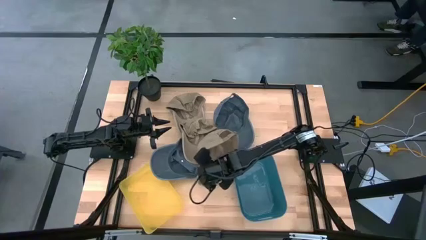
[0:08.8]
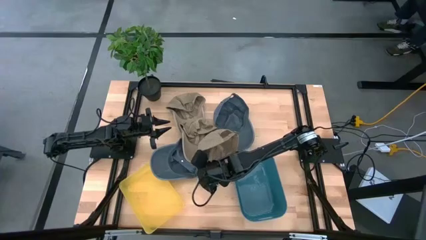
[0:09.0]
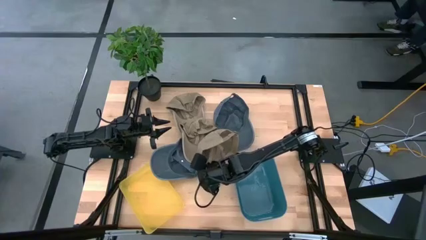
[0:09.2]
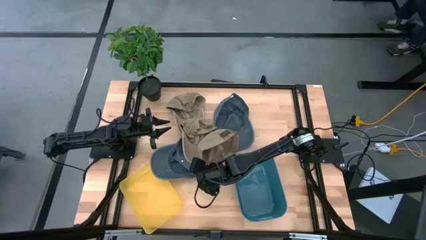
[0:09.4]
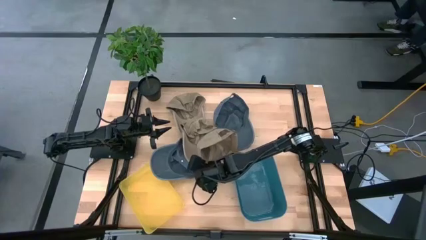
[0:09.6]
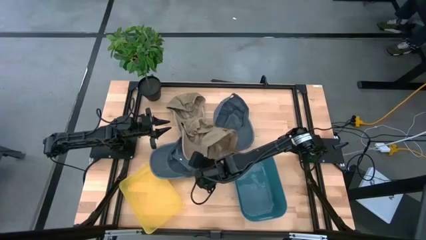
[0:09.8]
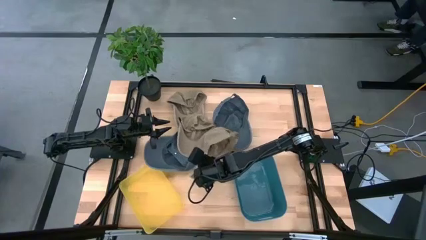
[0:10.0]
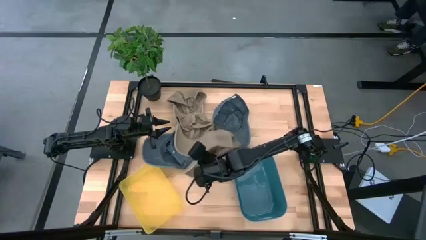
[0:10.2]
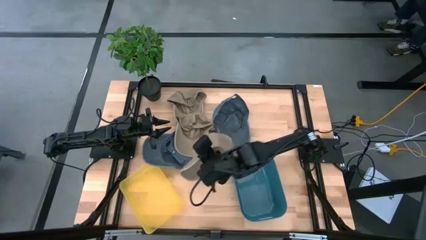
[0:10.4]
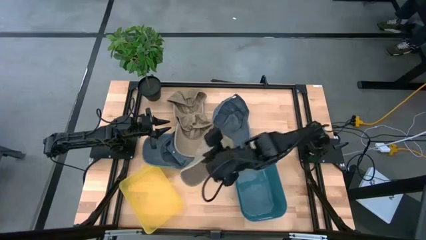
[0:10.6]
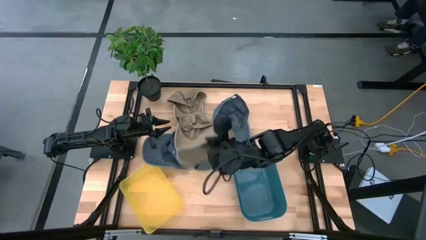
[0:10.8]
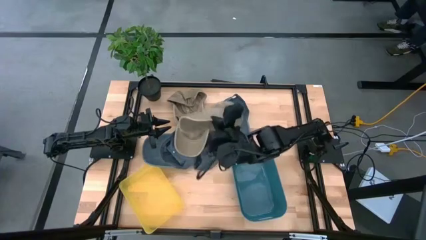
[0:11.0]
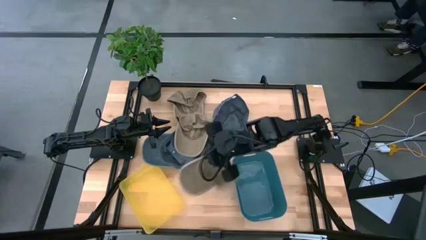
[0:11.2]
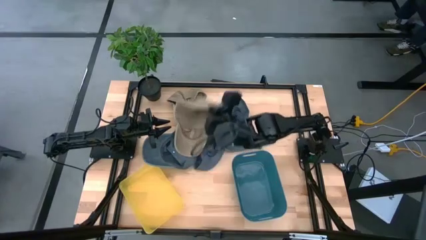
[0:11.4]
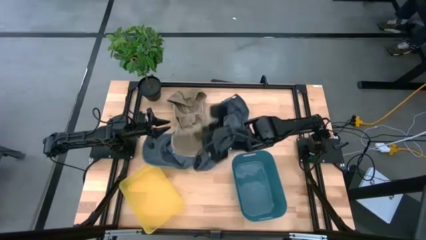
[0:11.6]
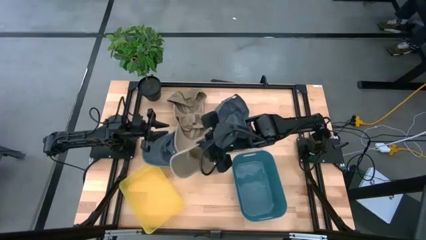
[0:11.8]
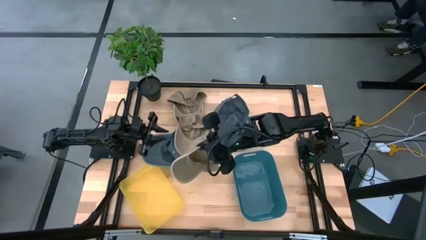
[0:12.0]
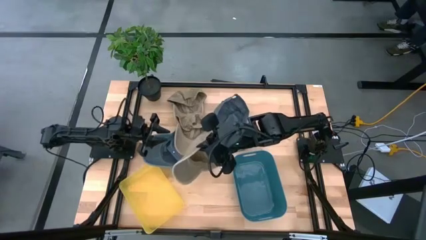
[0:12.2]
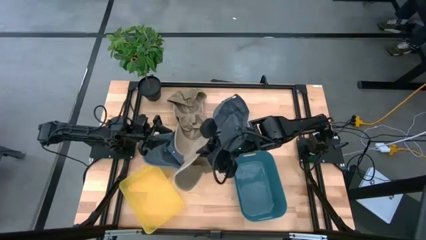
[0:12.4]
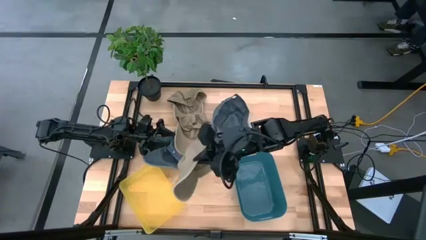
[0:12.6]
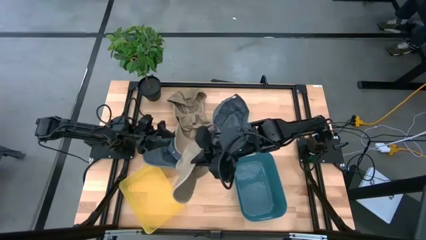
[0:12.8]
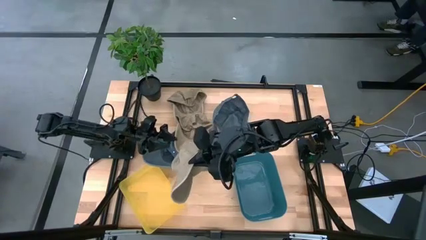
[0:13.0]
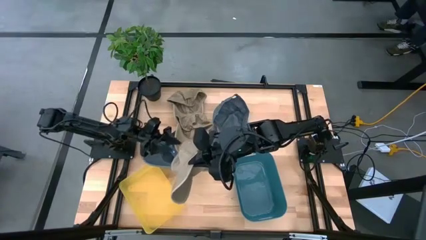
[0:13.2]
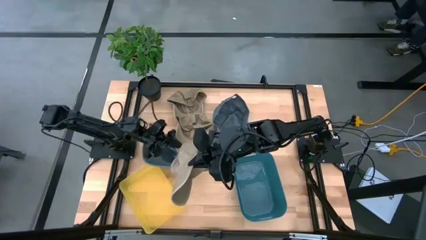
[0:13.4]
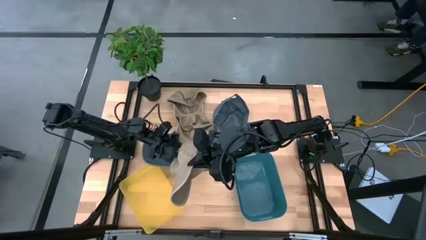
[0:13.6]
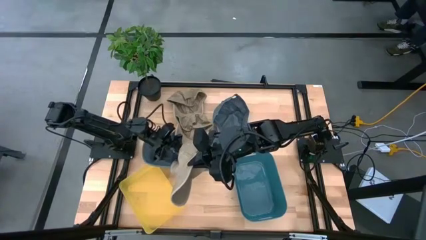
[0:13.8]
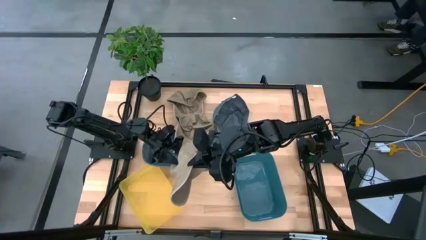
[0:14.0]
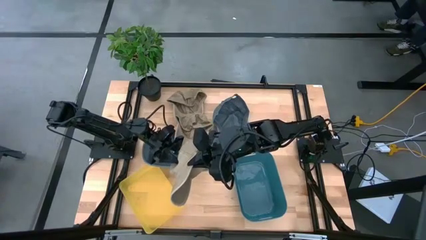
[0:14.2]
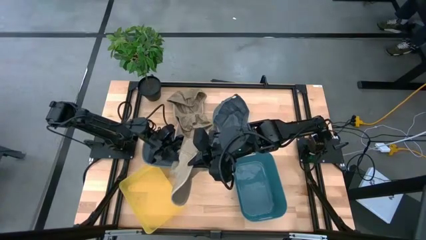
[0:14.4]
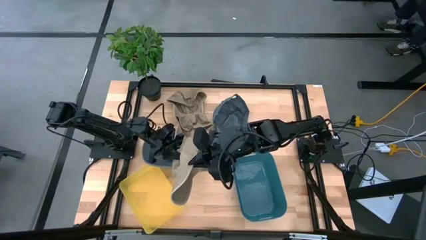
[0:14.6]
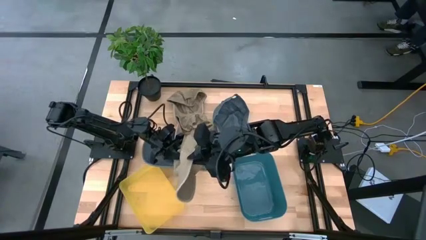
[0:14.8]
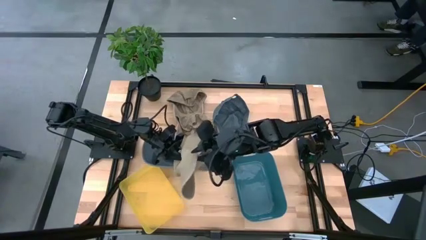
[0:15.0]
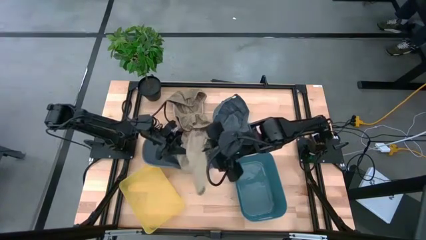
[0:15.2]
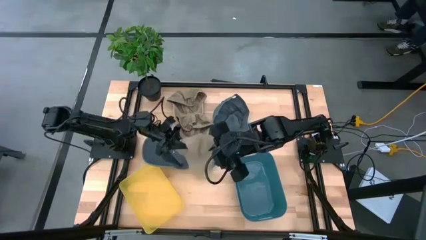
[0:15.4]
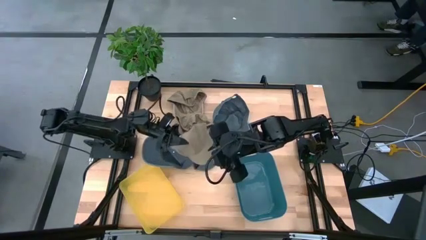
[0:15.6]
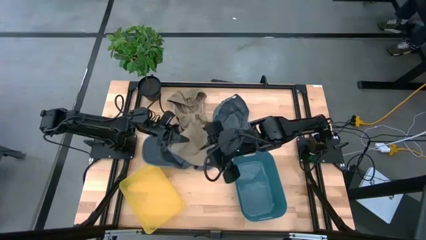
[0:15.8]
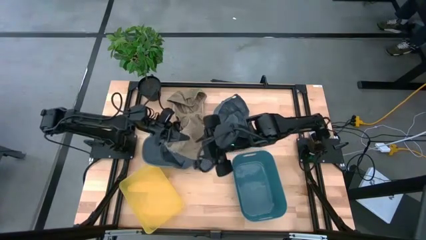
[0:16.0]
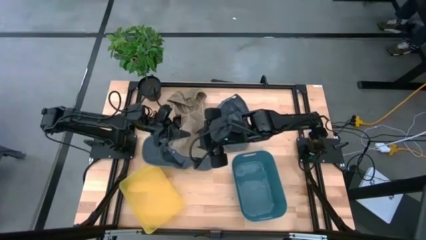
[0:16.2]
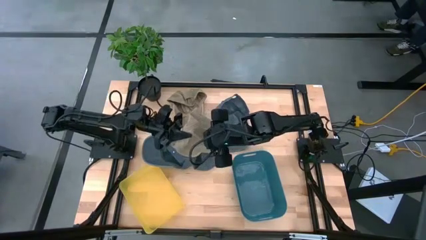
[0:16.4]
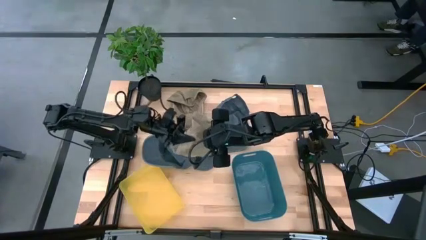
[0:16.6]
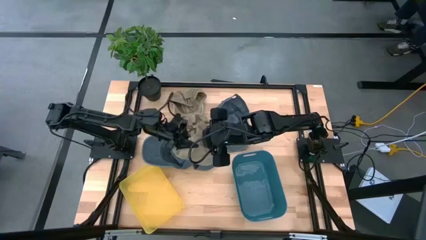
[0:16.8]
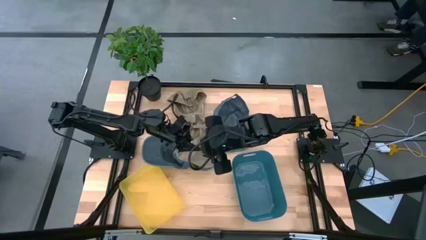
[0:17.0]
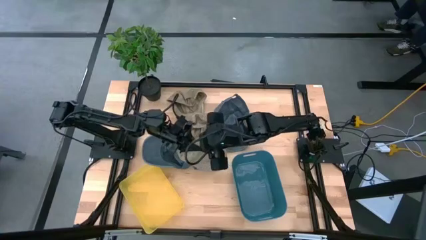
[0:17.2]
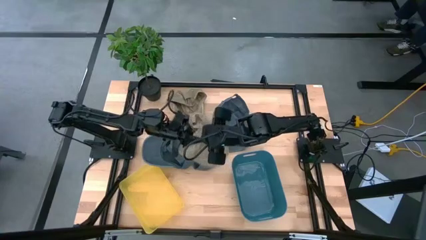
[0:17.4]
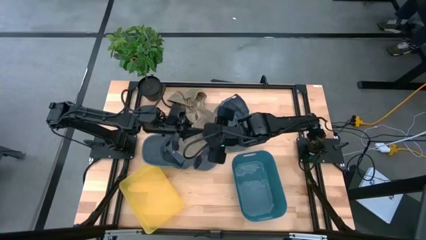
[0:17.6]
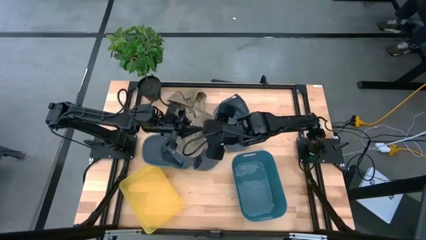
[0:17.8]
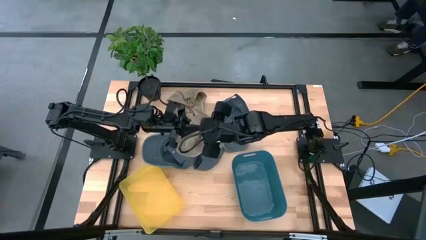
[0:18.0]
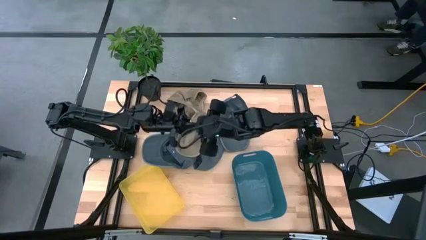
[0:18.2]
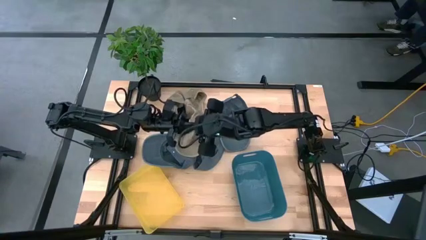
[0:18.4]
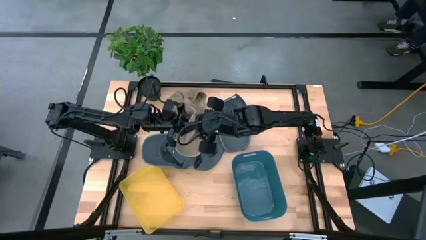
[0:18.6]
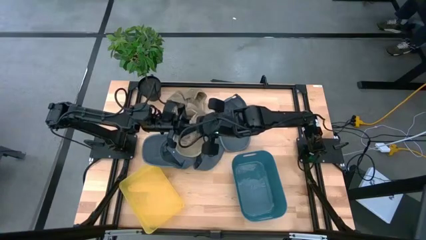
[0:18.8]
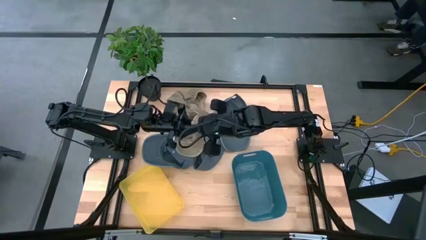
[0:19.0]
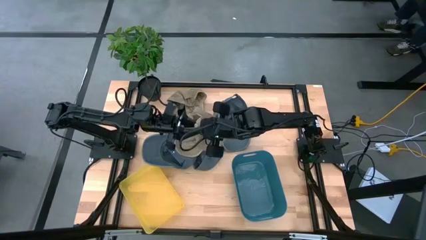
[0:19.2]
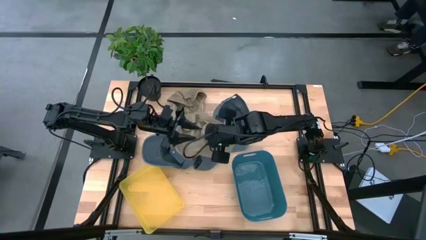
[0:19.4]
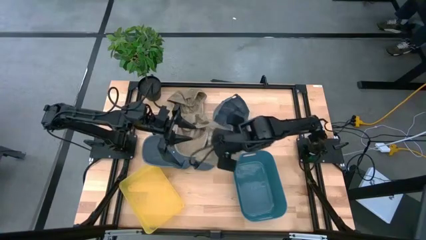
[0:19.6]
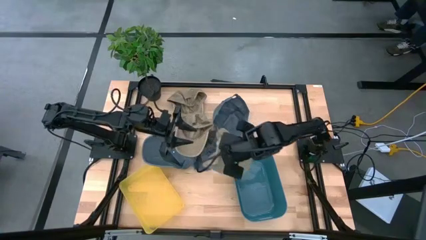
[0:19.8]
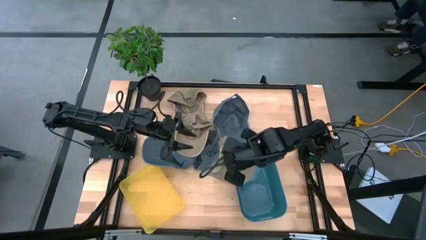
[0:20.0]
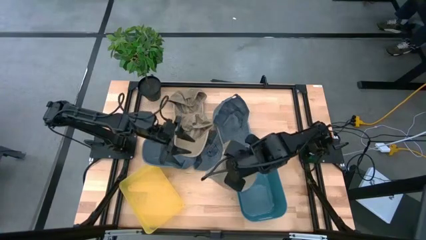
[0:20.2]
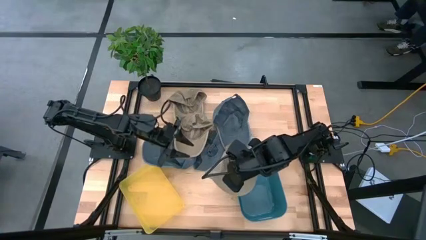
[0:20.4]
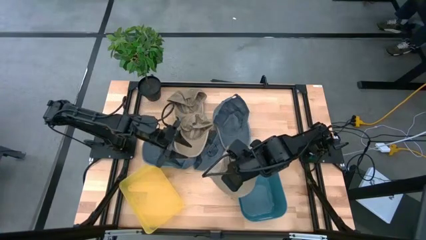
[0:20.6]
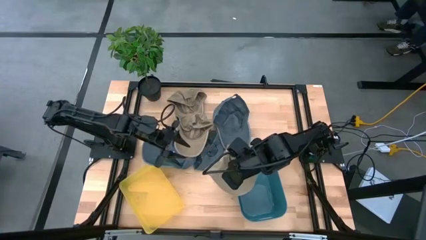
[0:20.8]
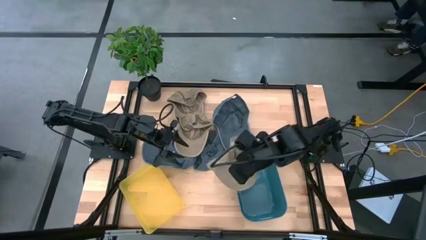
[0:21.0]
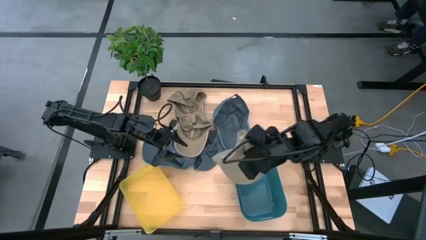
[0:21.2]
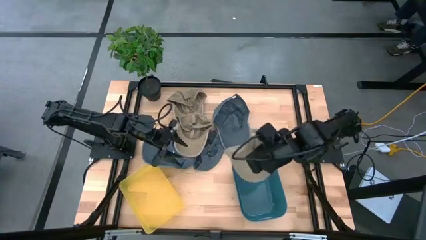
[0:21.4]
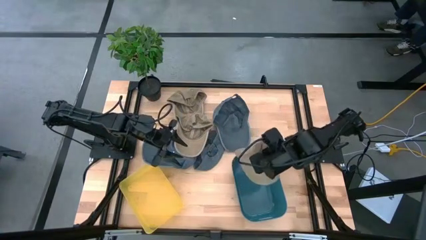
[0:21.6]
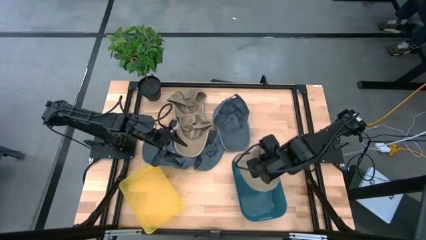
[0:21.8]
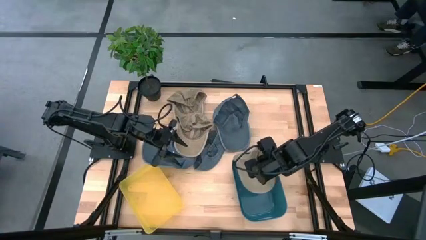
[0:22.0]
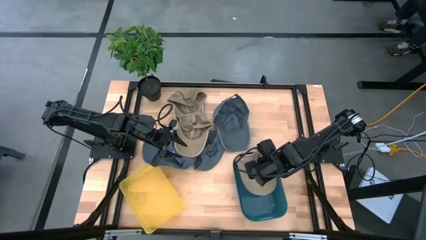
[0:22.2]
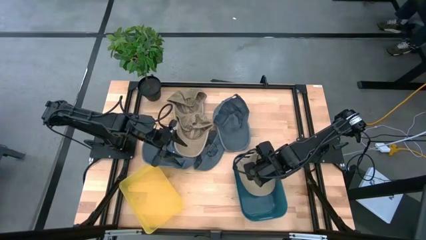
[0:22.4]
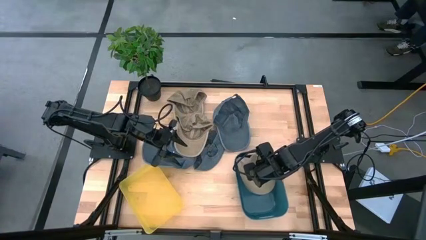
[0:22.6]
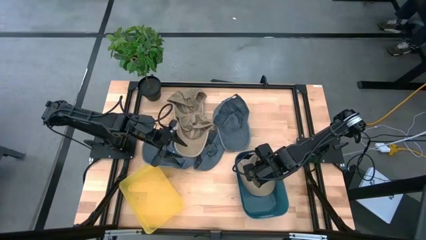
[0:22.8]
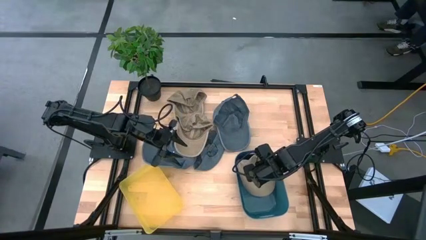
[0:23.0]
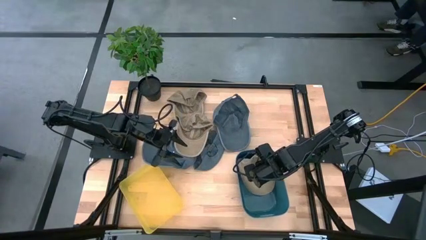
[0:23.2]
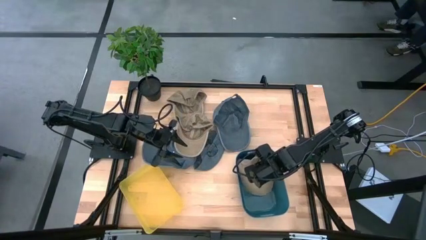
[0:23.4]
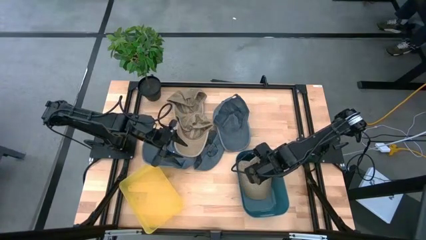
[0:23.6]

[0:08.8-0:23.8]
Task: Pick & Place hat
Put the right brown cap into the blue bin
